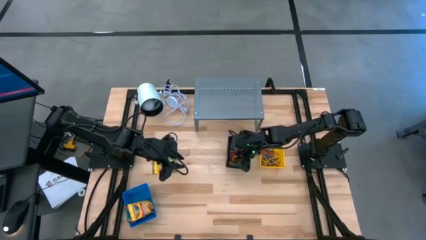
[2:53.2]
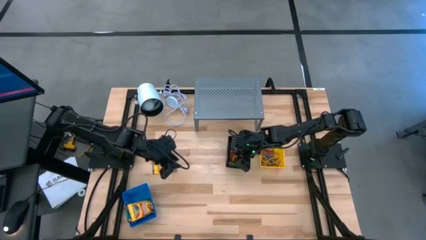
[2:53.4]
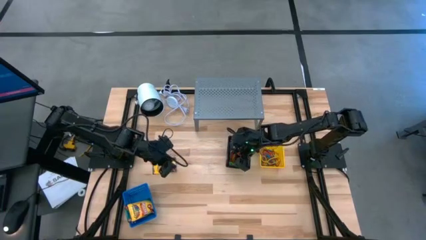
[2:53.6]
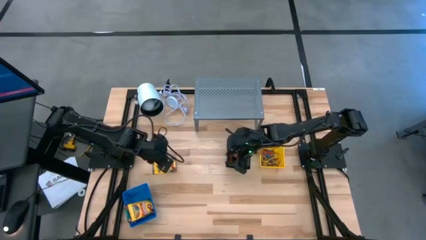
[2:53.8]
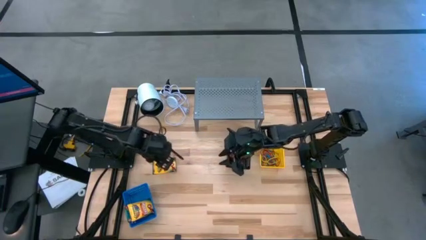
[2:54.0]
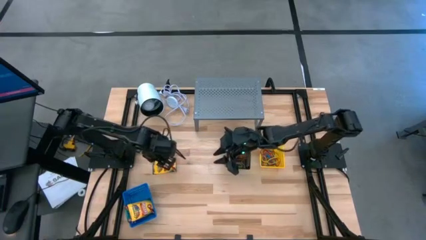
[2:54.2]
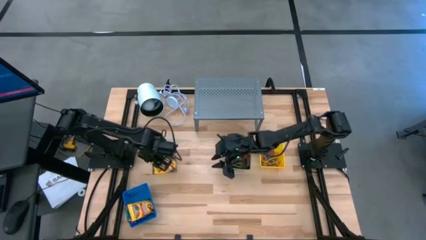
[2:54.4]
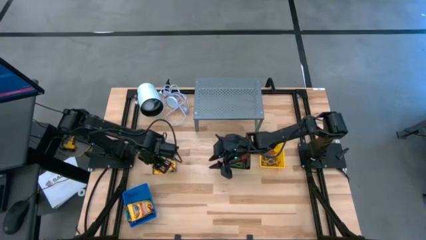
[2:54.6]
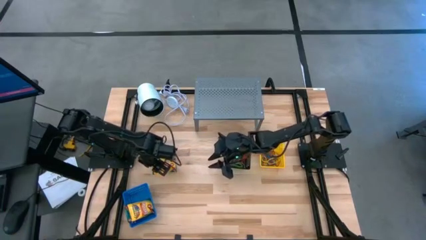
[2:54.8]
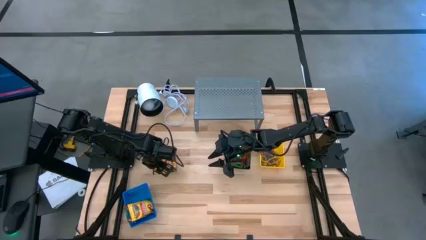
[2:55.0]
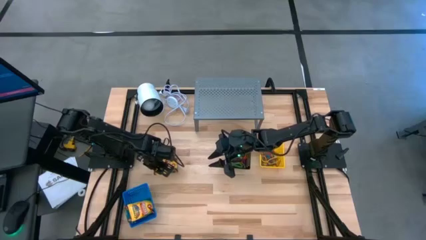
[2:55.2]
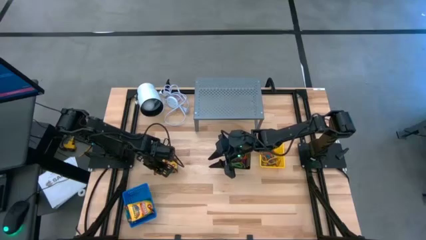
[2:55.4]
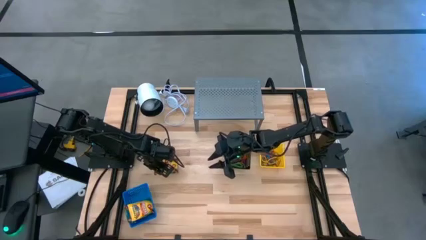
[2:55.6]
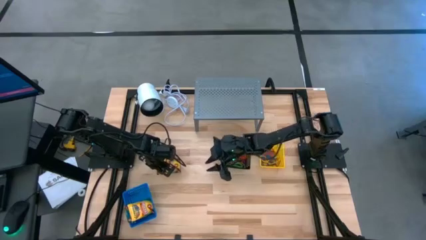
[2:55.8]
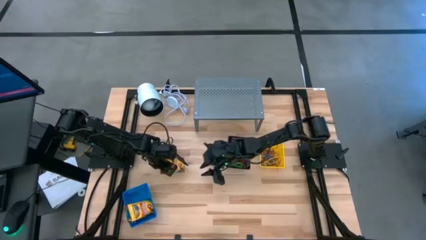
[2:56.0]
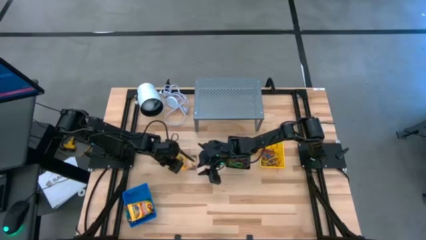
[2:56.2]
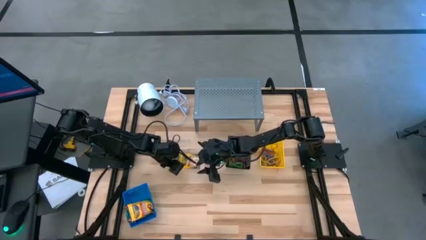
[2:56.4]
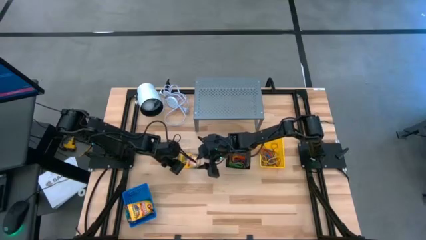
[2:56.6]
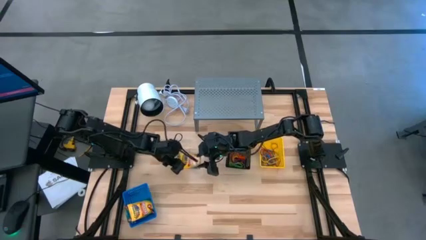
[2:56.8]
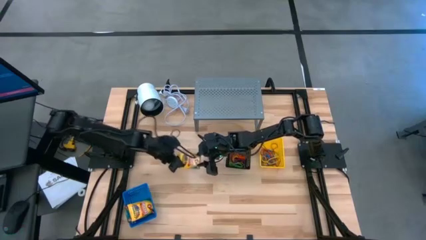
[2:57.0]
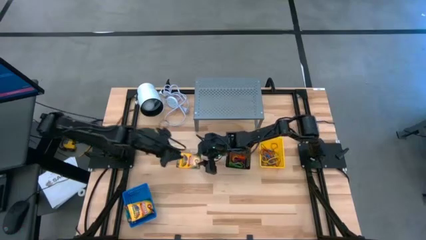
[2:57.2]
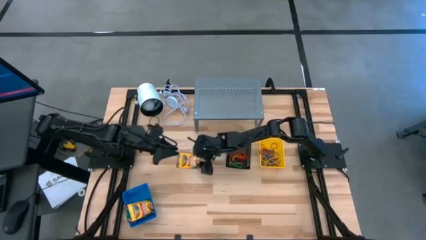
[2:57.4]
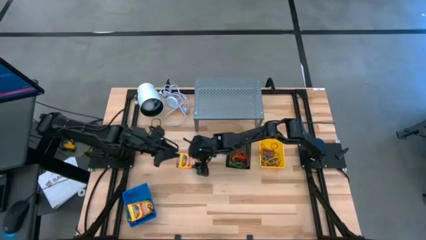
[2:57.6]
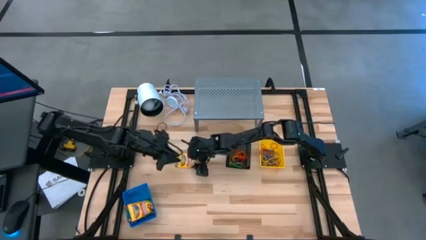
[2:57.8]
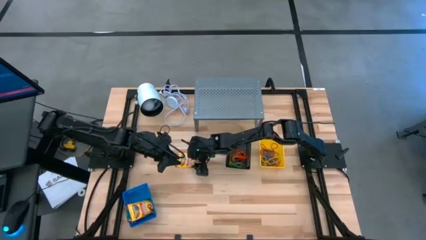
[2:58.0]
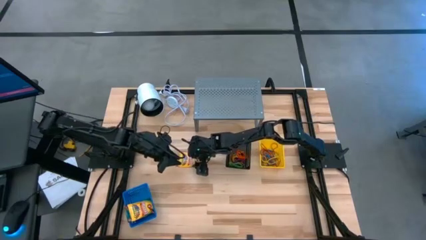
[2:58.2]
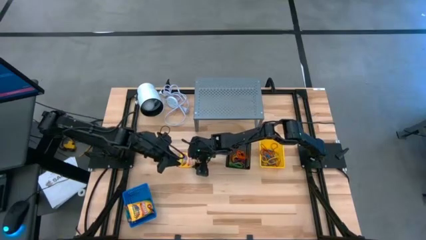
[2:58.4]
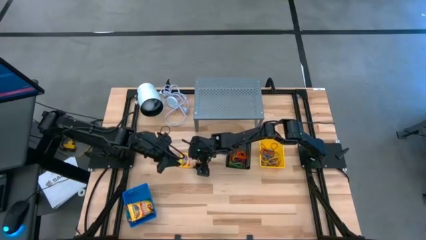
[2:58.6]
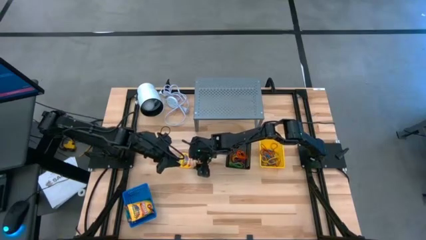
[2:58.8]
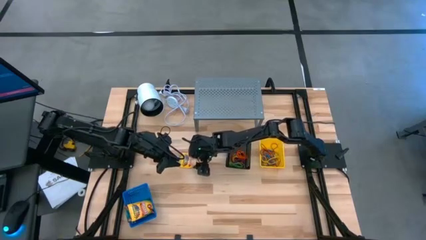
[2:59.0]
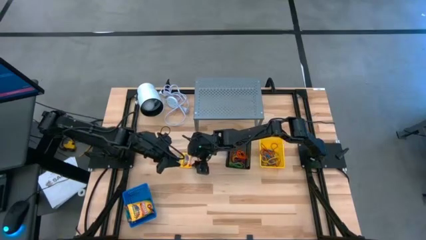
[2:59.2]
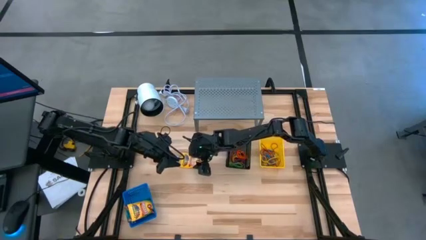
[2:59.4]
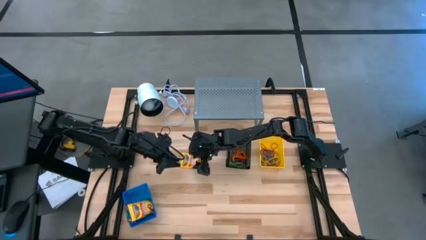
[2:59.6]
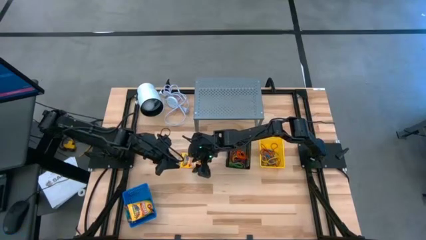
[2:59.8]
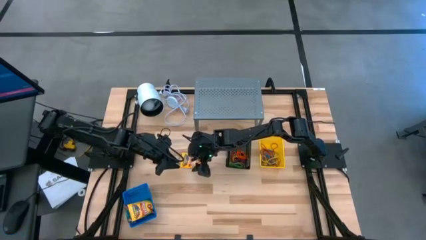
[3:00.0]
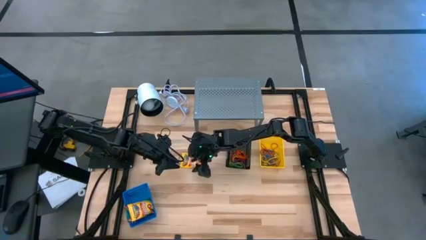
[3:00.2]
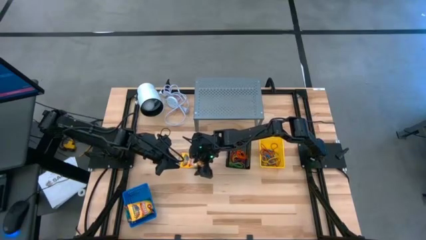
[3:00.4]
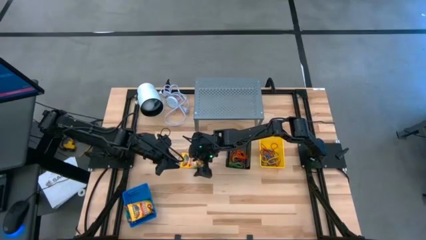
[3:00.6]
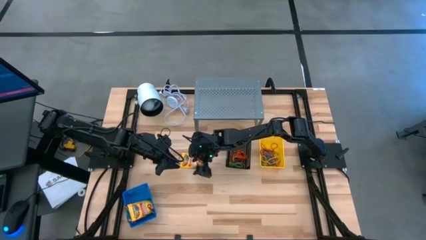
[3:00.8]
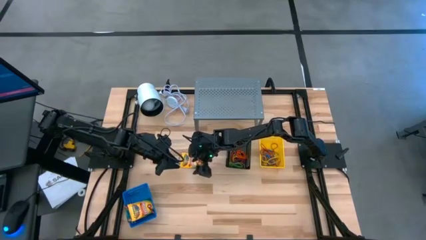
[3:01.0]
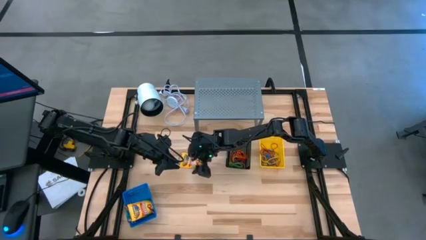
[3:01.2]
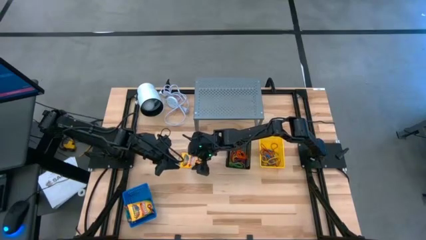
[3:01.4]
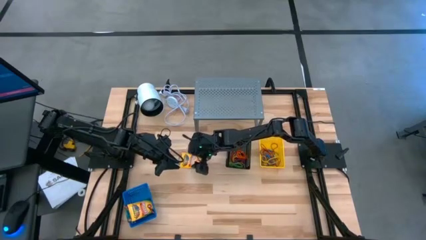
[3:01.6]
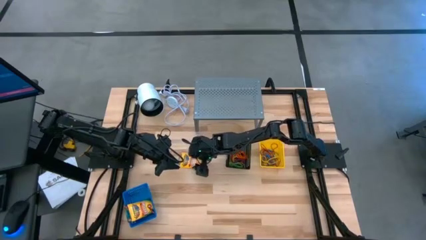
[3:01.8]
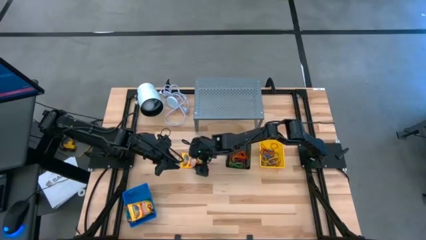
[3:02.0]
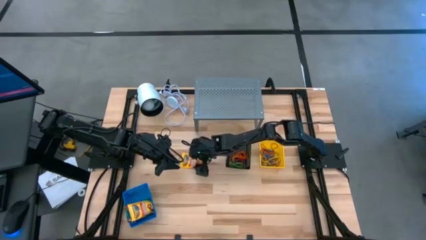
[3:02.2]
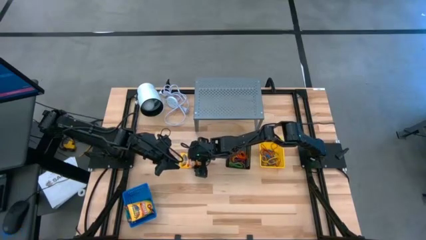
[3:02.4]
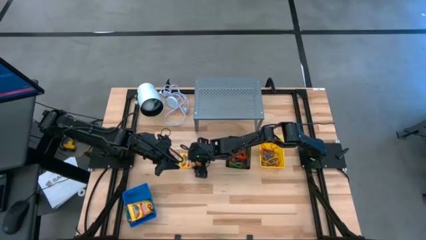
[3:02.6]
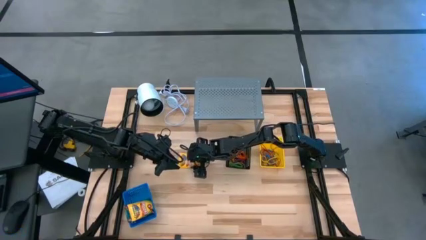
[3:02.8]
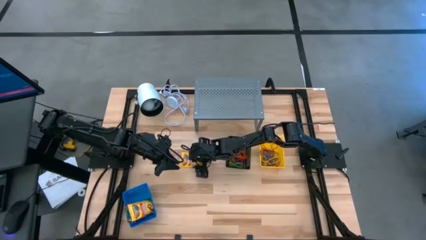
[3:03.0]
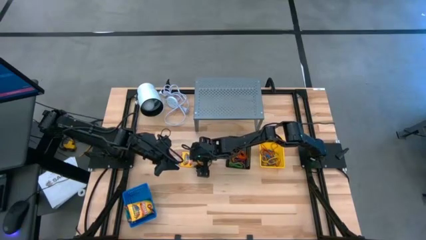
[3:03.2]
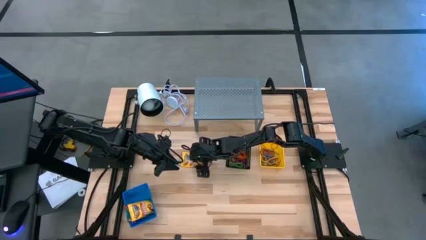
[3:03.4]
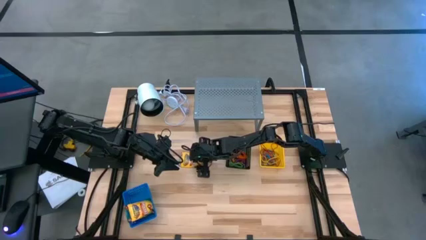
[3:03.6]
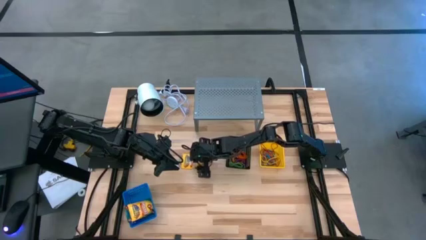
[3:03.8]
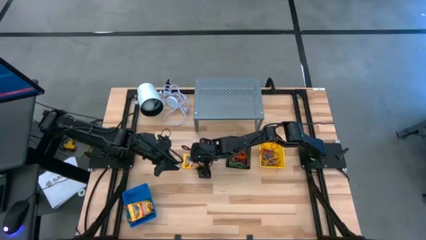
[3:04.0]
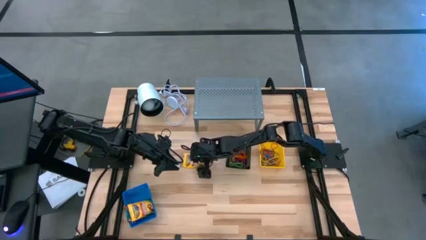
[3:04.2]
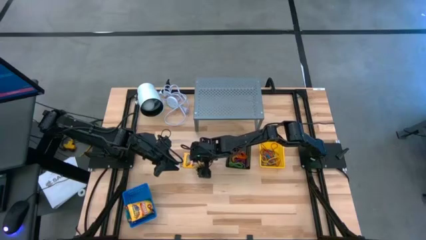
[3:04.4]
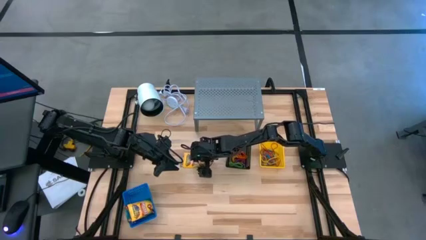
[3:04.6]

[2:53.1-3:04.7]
Task: Pick & Place Office Desk Supplies
Put the middle left crayons box into the blue basket

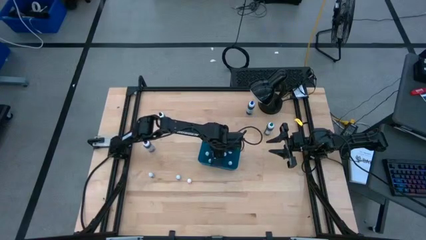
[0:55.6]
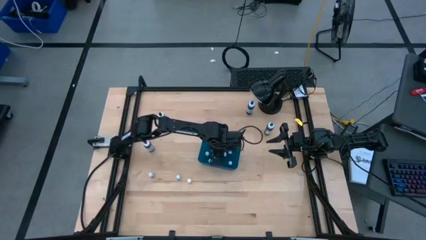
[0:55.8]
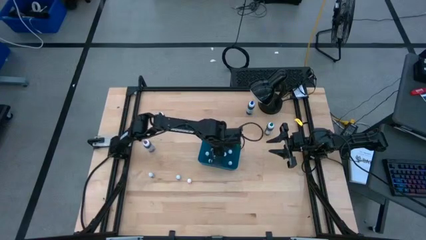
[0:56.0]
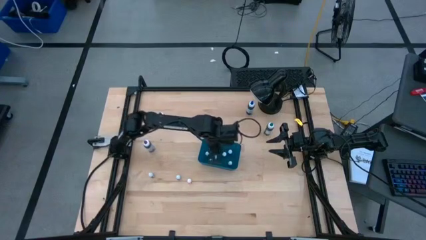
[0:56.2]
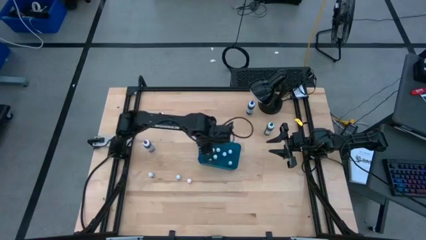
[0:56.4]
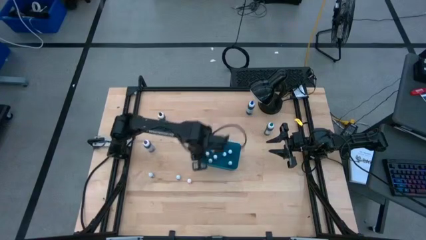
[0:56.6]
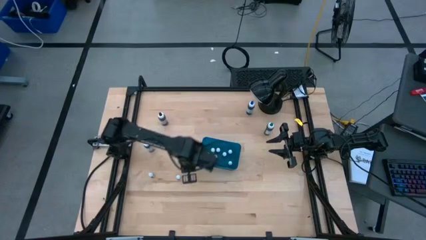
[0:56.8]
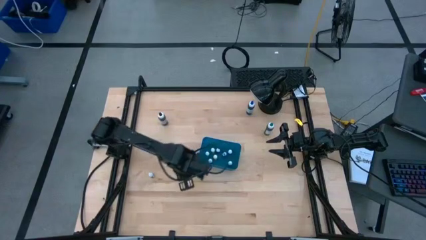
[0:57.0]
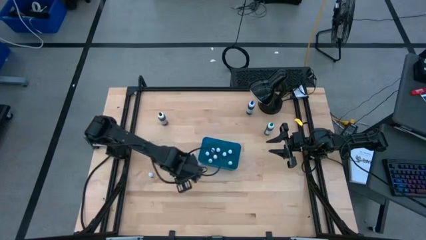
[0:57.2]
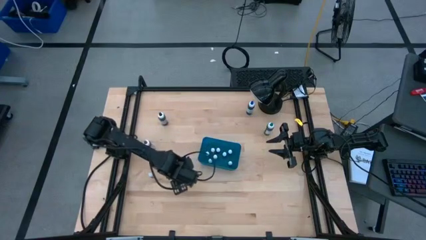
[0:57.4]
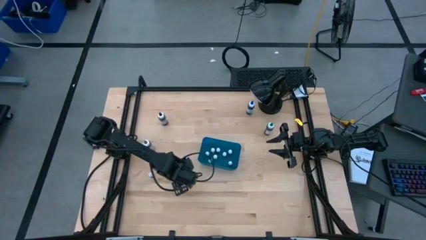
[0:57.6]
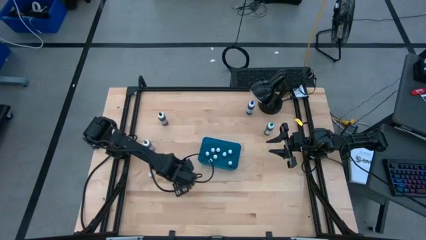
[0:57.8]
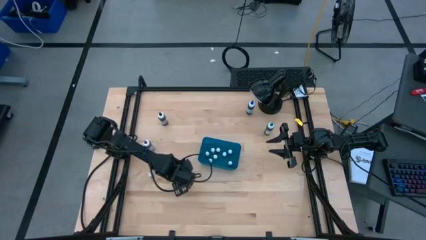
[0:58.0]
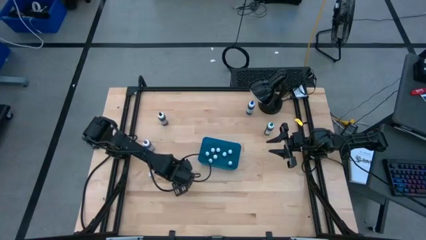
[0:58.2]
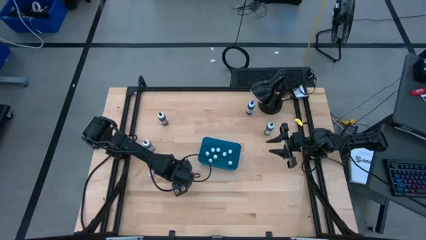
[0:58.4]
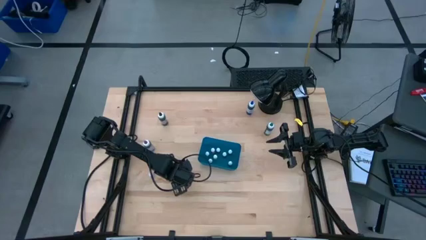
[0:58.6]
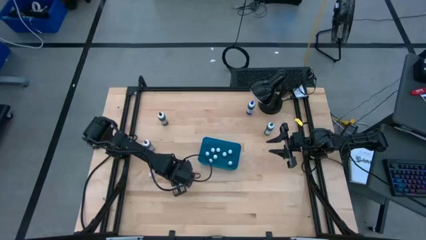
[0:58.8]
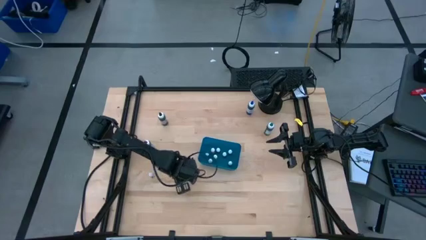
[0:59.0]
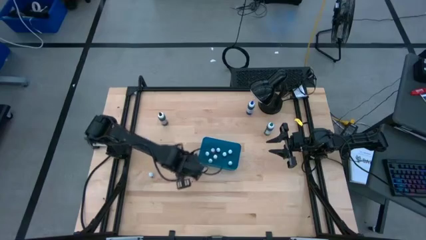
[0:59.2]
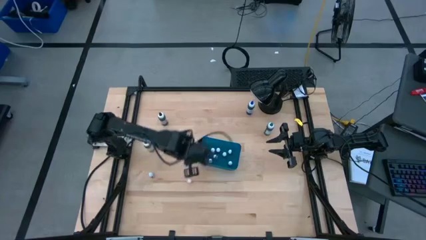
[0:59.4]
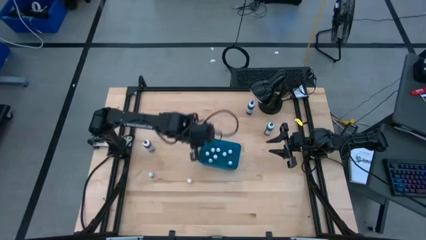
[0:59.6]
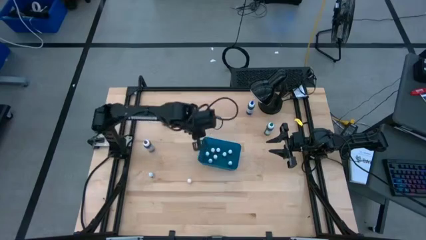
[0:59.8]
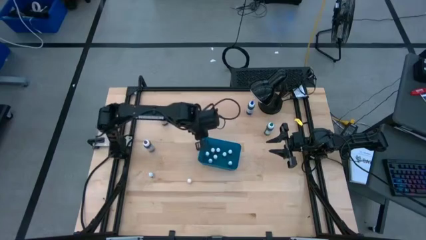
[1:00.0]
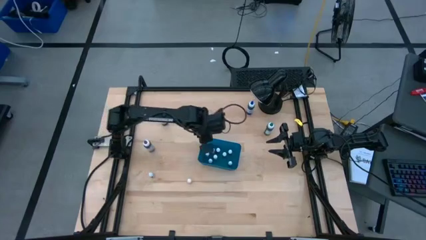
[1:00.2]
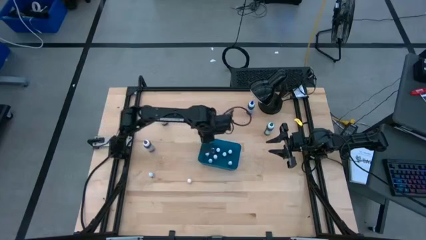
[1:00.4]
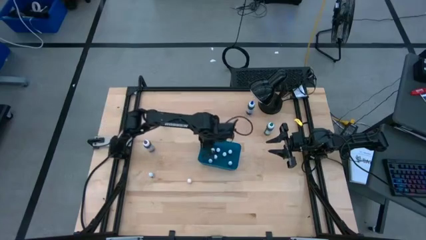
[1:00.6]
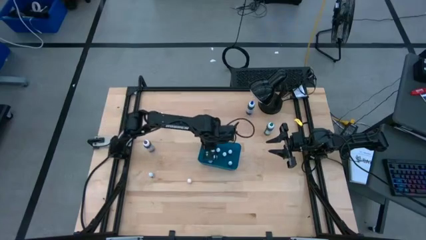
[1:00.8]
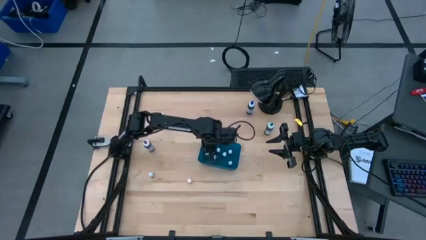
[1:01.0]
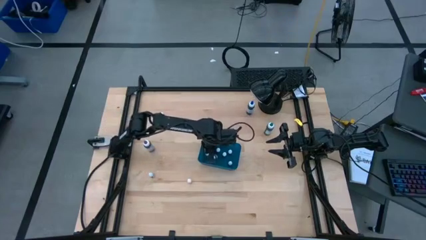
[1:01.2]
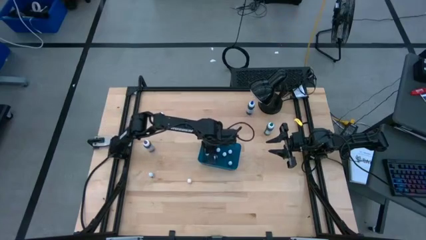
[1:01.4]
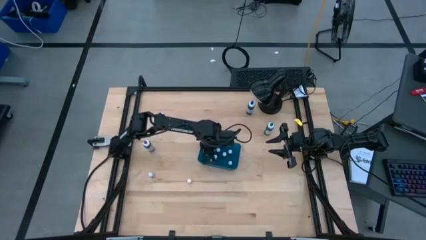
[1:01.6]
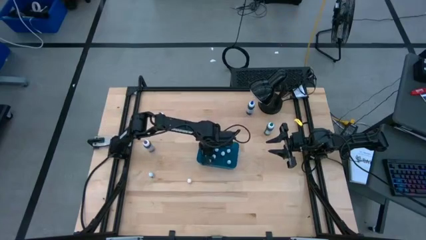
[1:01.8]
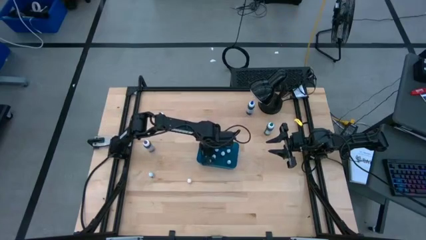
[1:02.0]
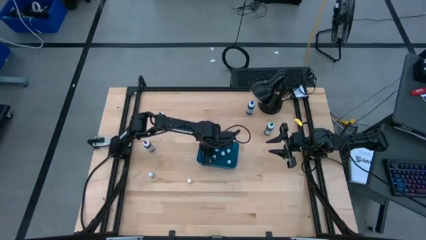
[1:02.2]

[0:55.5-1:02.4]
Task: Pick & Place food coloring
Put the small black food coloring bottle into the blue bin
